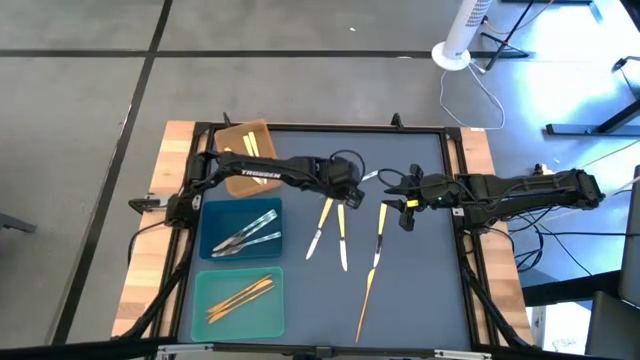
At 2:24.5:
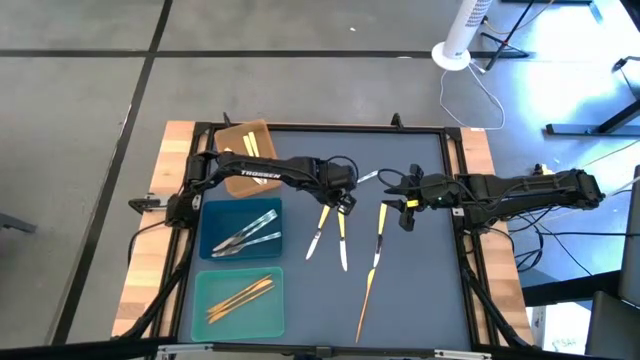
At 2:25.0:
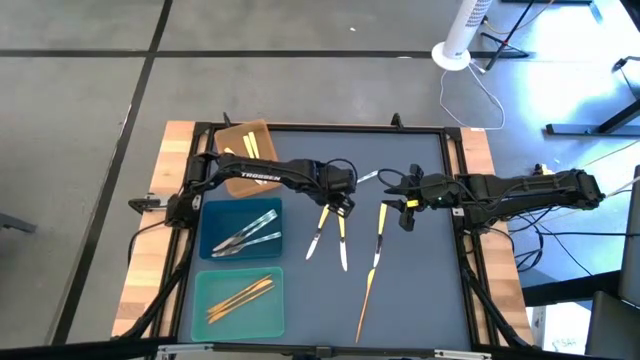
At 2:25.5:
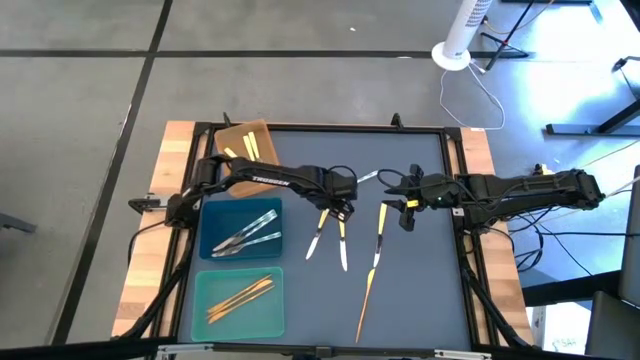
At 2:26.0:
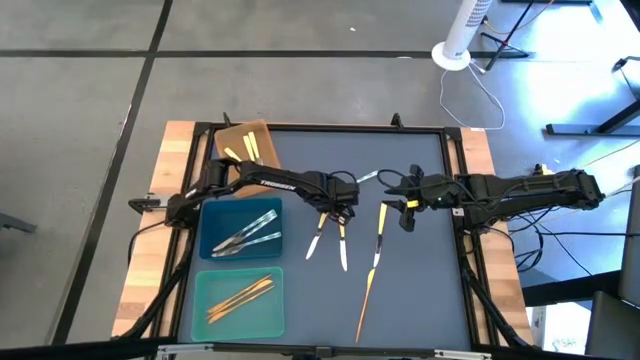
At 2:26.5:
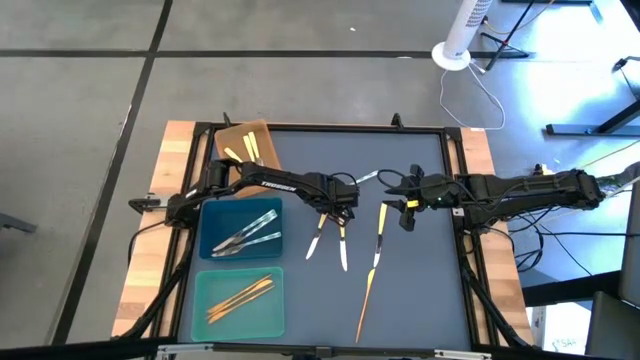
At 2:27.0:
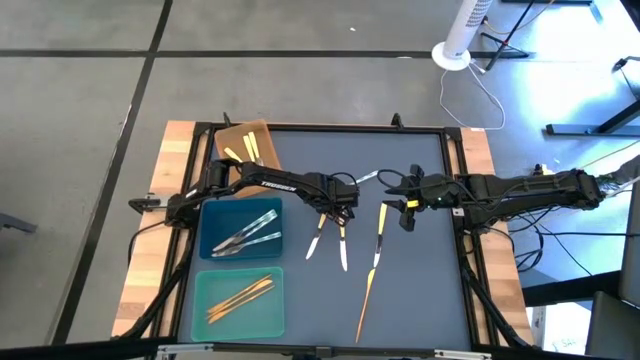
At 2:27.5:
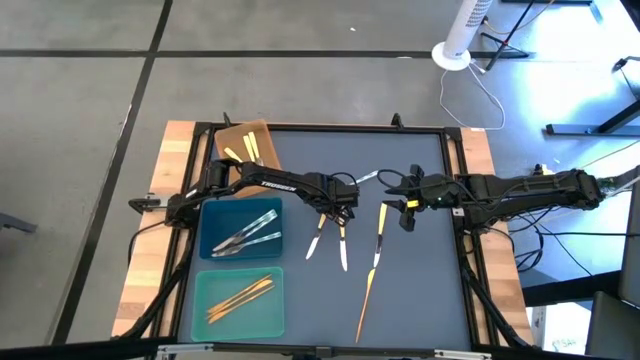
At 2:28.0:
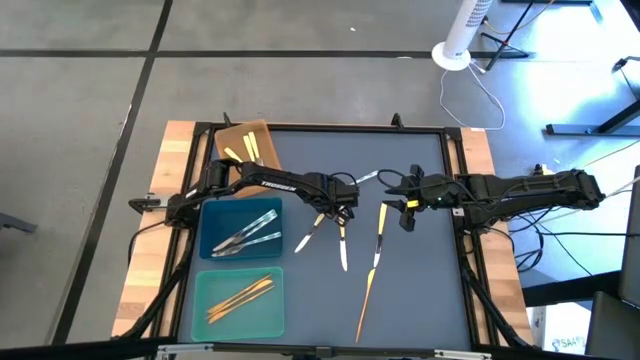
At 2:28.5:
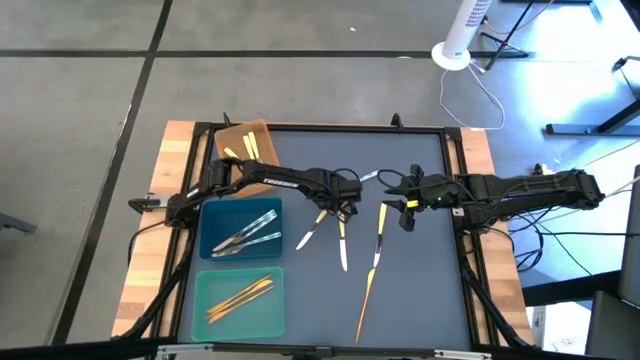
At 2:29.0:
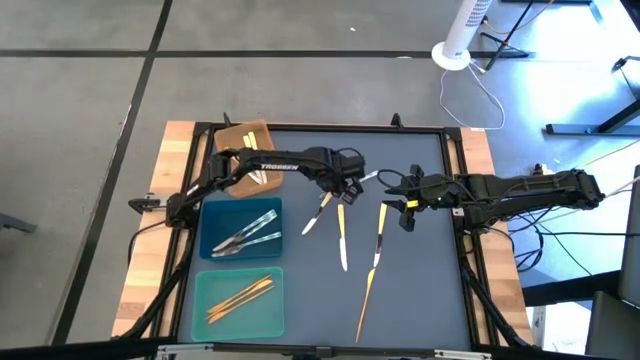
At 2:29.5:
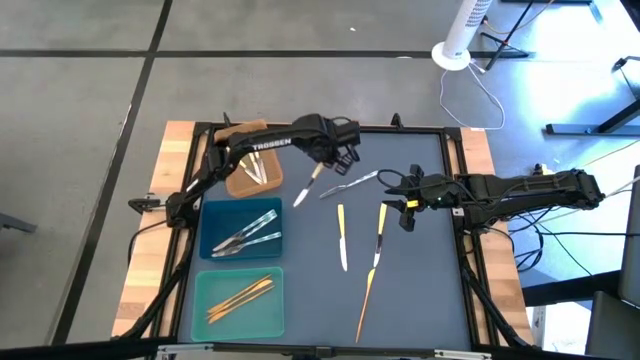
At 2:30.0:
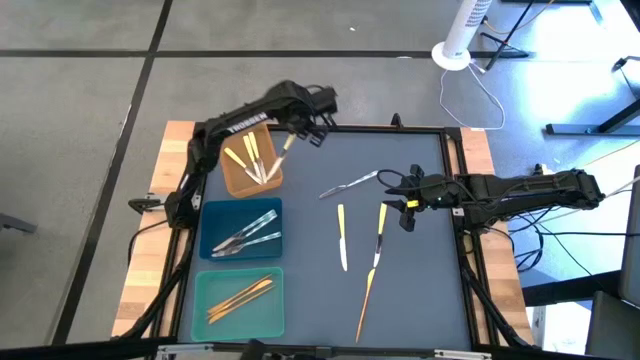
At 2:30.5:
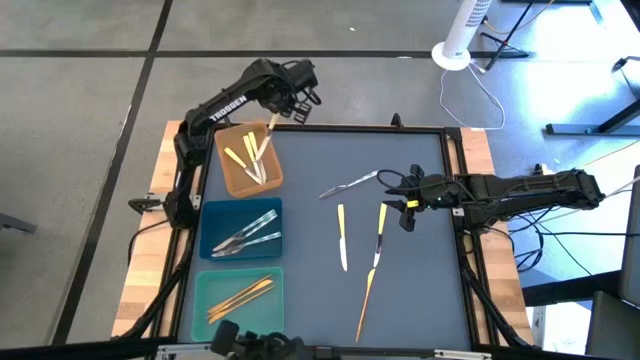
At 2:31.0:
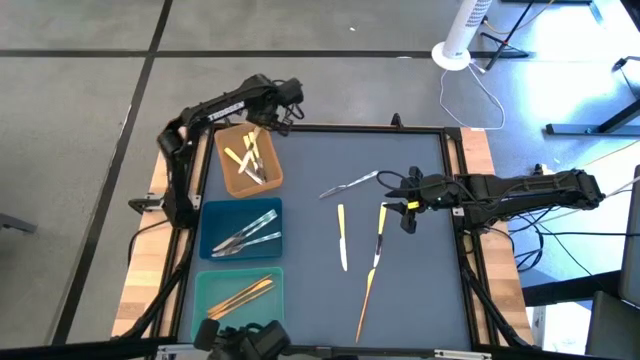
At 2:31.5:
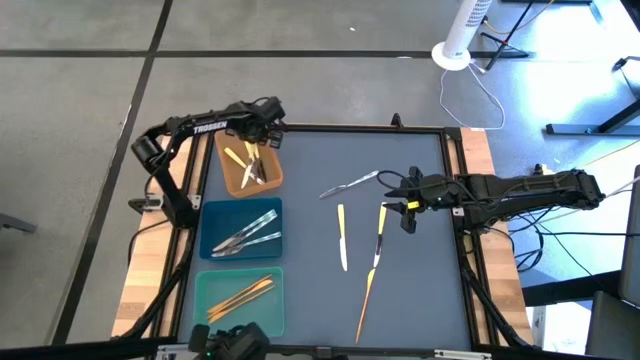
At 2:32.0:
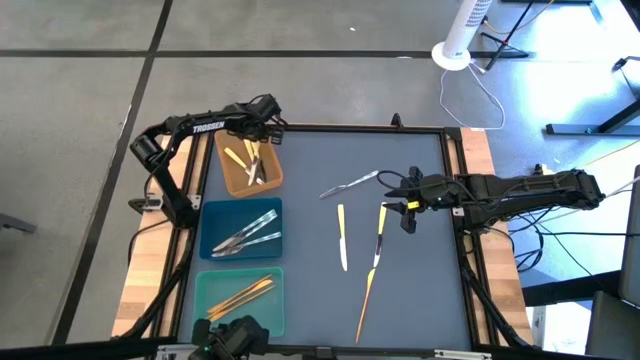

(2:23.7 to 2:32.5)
Task: Sort silverware by color (type)
Put the yellow knife into the orange bin

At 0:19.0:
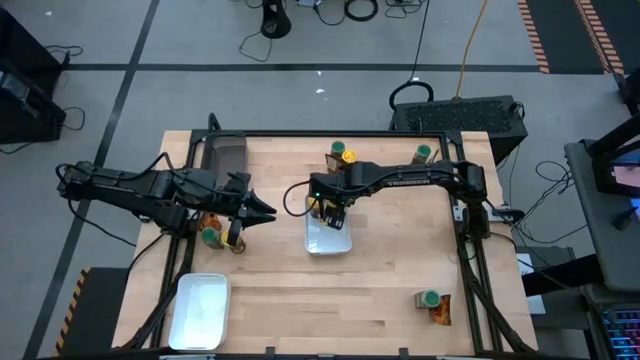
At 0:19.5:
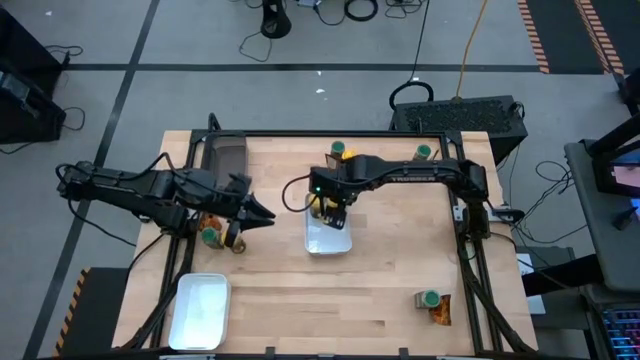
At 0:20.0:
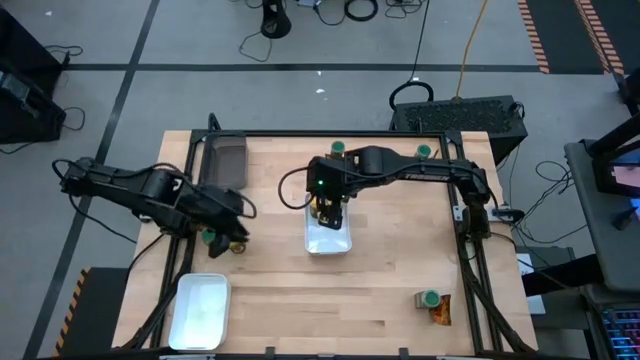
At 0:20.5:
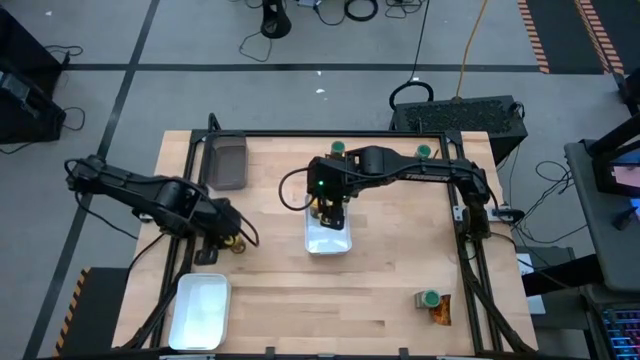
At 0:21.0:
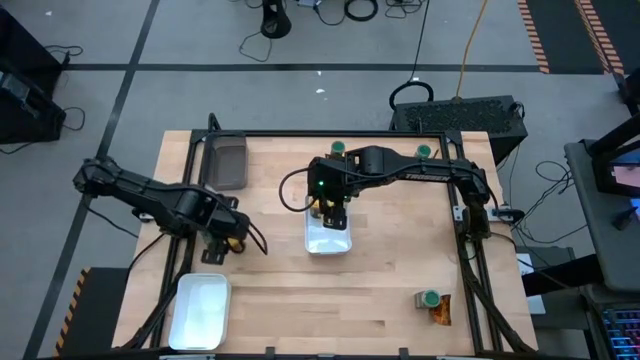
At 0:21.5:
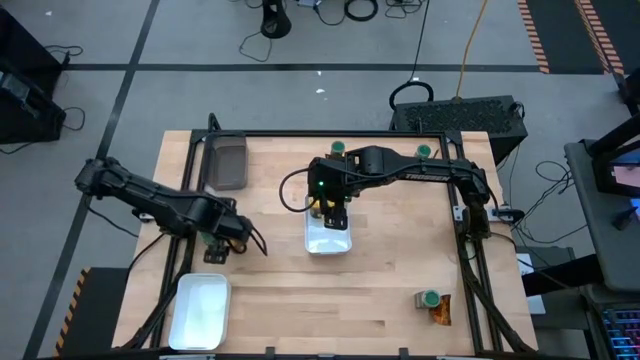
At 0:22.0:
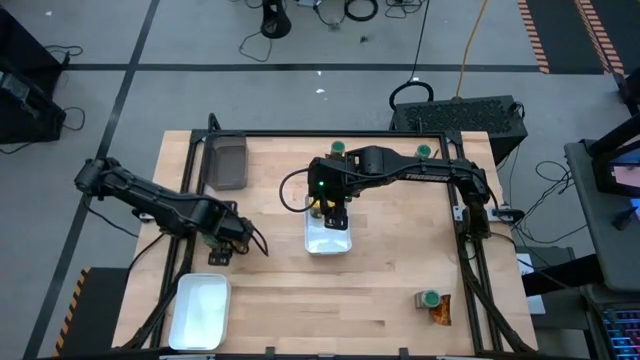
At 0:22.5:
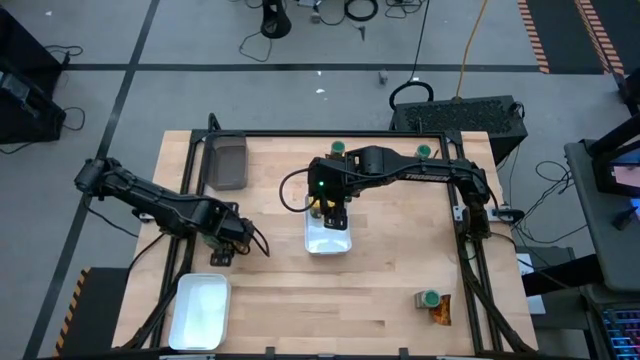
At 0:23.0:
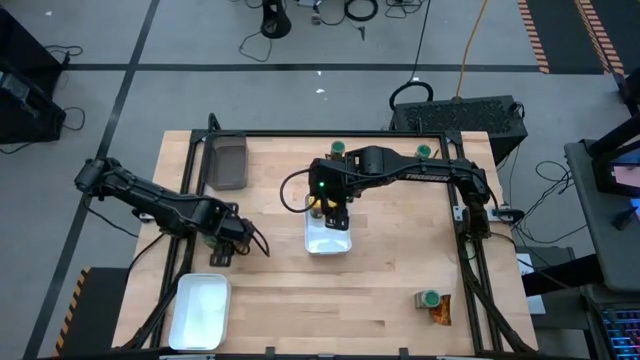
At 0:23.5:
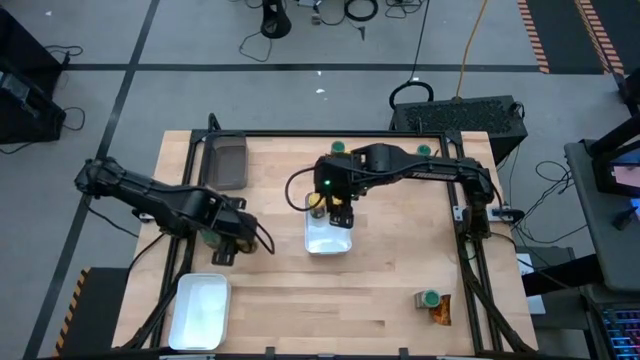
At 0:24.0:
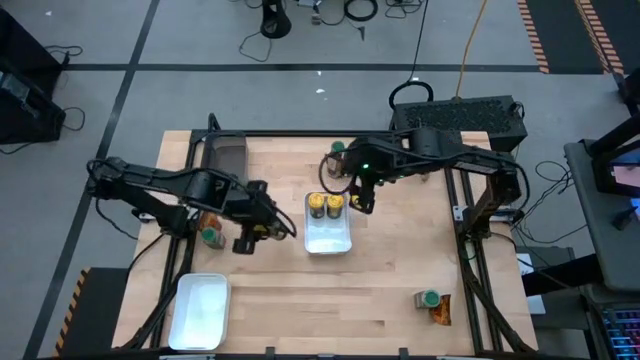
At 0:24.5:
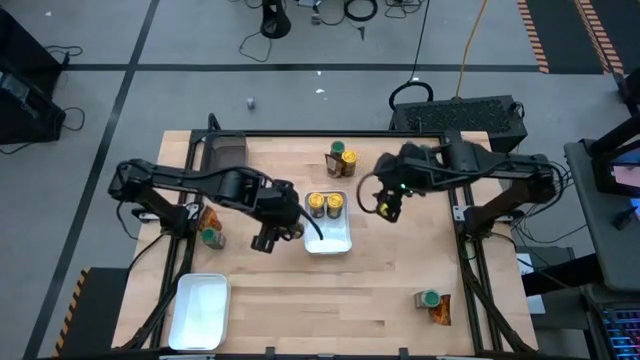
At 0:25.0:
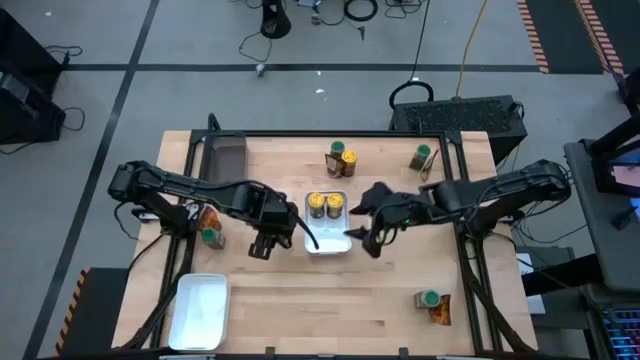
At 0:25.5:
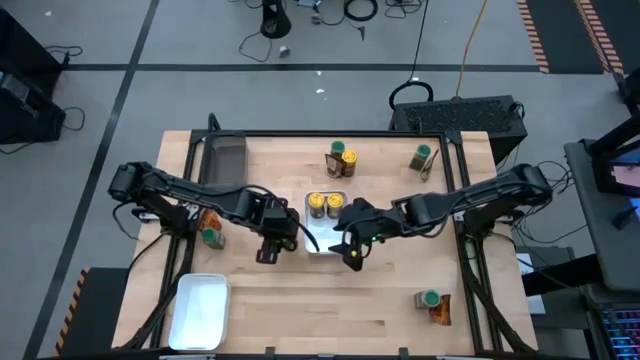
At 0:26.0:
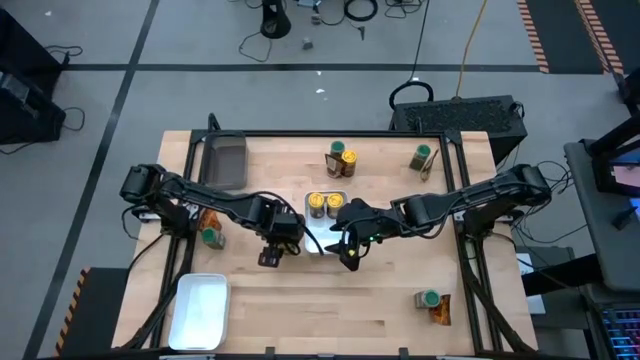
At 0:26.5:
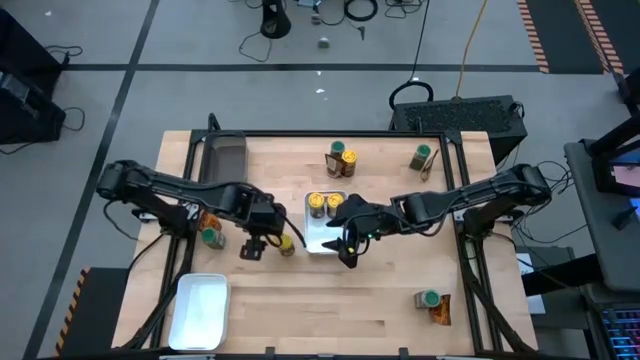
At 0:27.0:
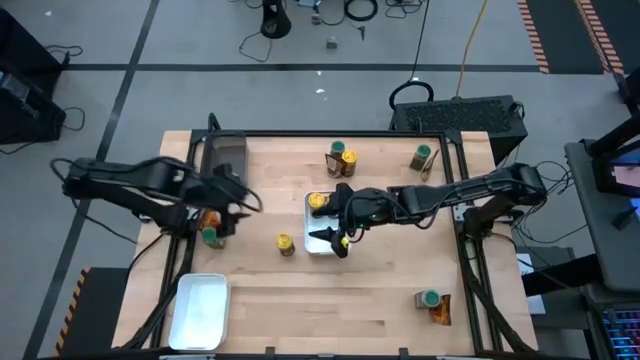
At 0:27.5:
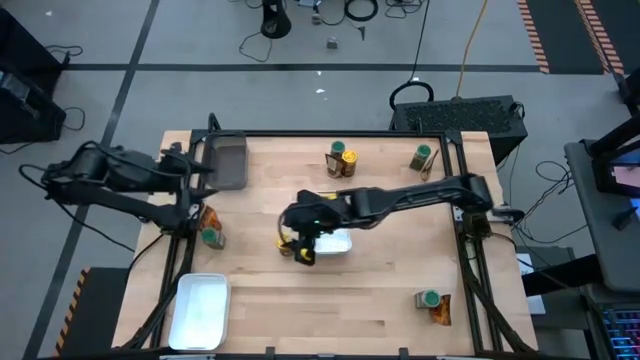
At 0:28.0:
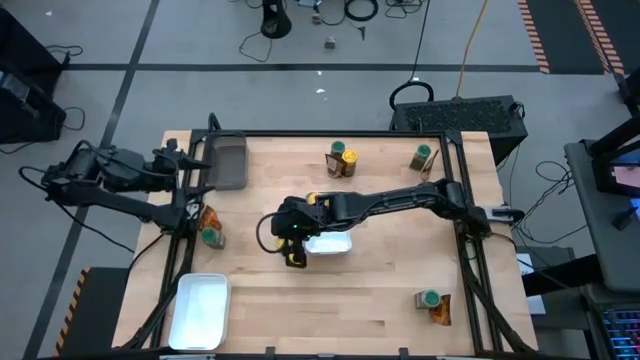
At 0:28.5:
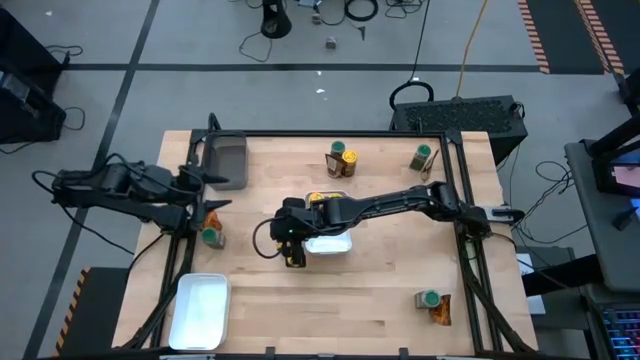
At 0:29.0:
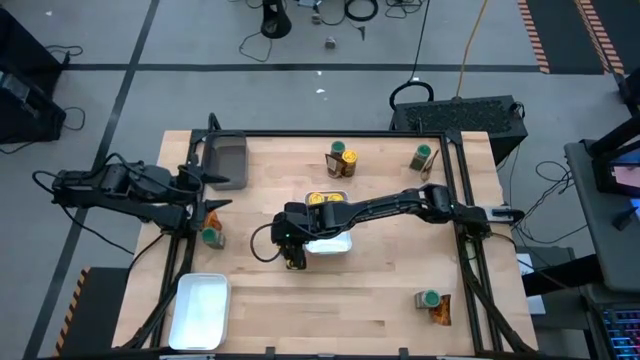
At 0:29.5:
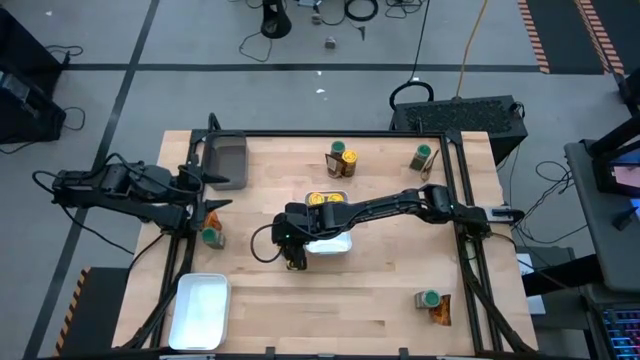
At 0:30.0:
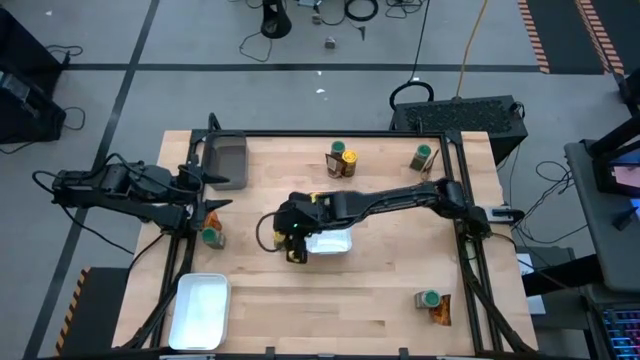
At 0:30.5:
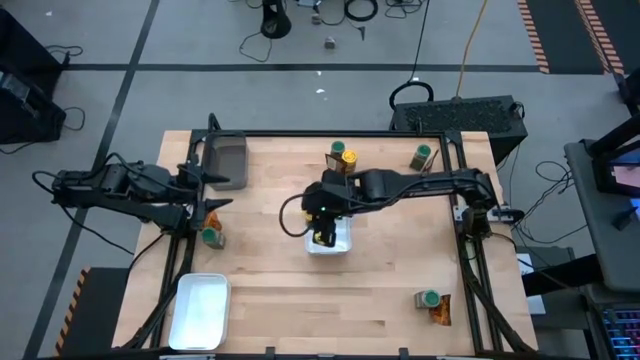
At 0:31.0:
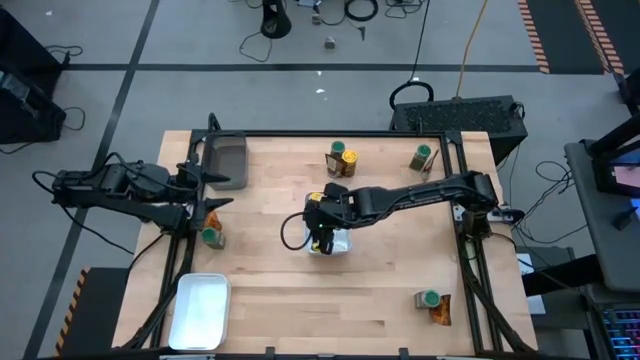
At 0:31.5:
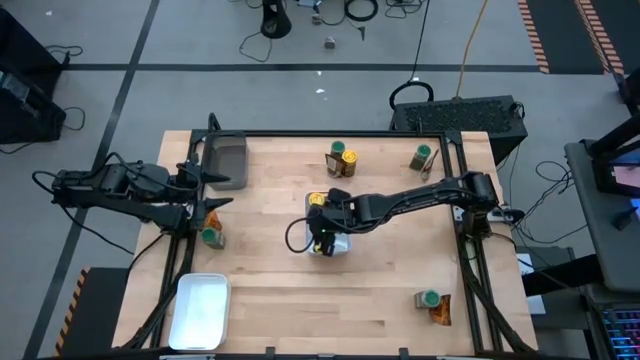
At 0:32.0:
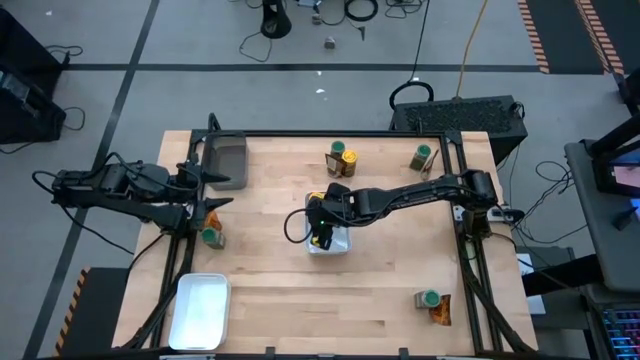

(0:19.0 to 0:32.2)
Task: Sort spices by type
Put the left yellow spice bottle into the top white bin
